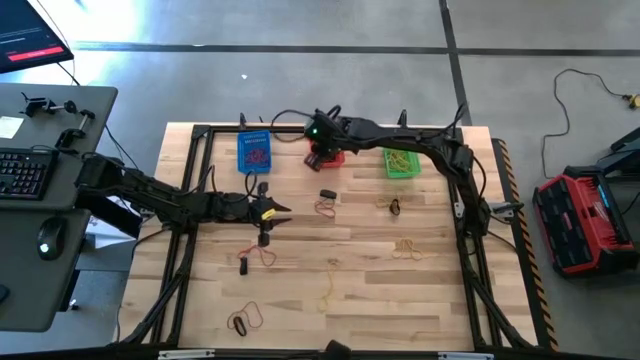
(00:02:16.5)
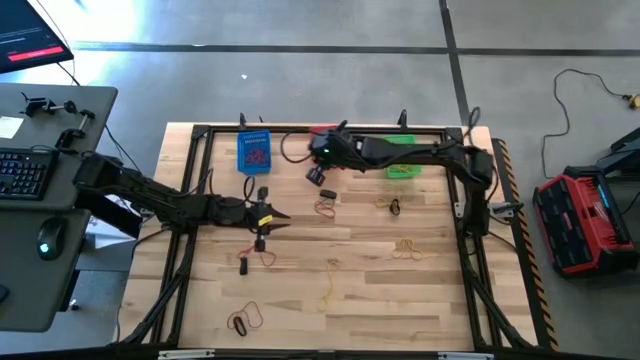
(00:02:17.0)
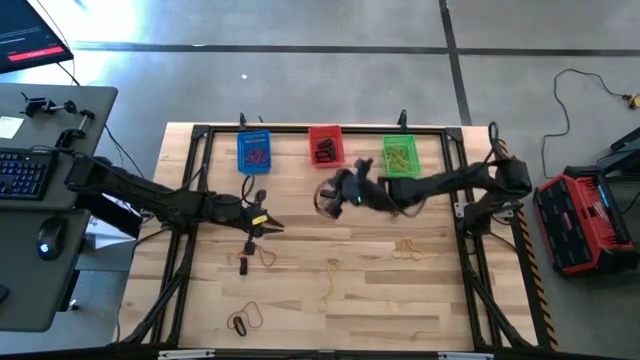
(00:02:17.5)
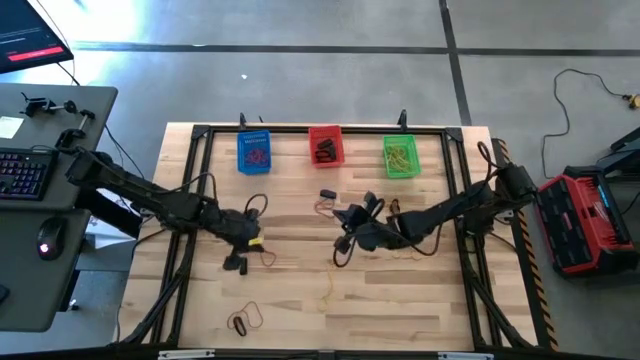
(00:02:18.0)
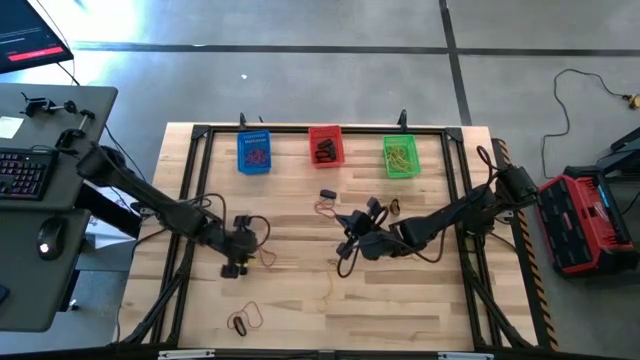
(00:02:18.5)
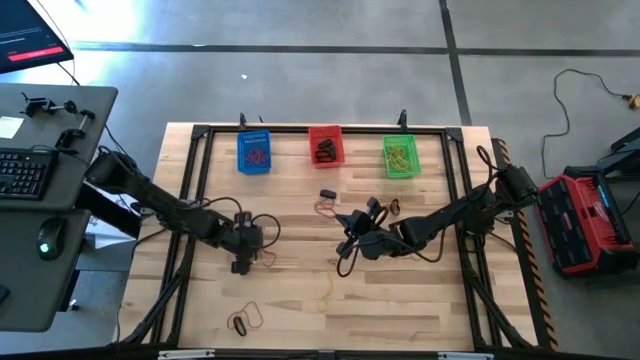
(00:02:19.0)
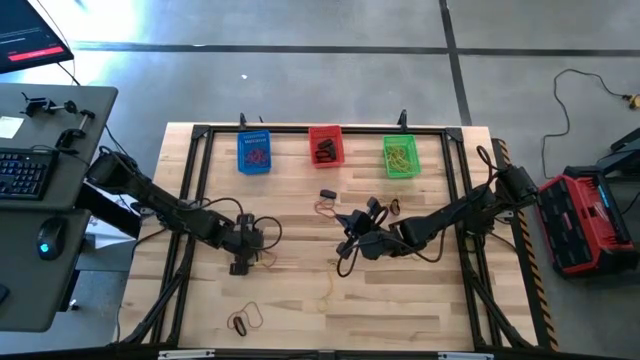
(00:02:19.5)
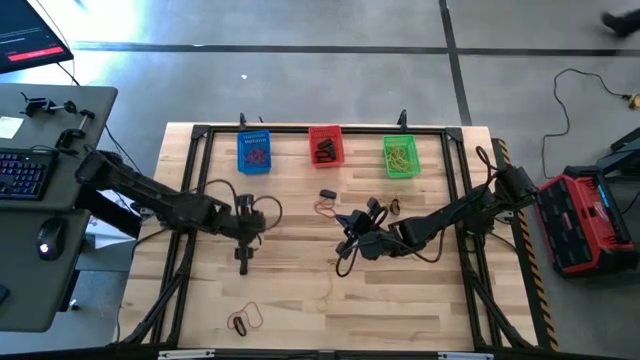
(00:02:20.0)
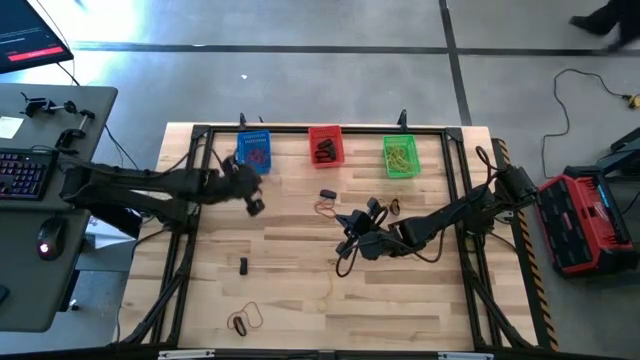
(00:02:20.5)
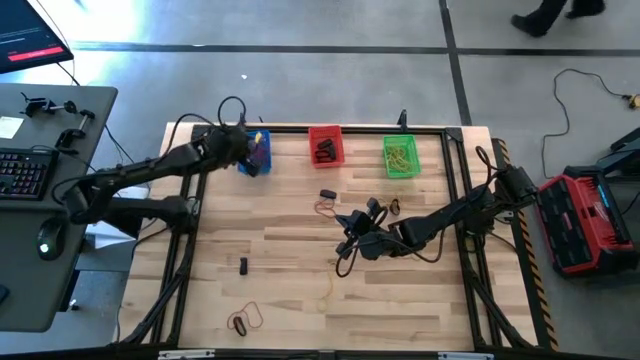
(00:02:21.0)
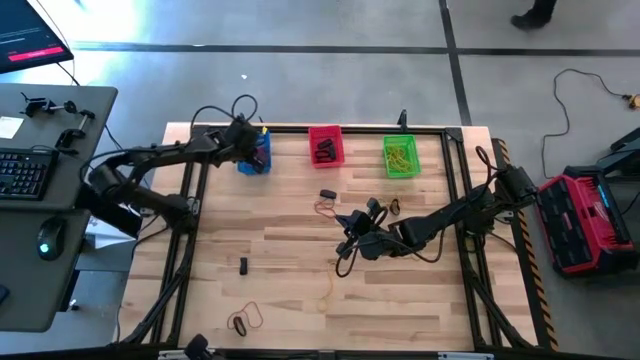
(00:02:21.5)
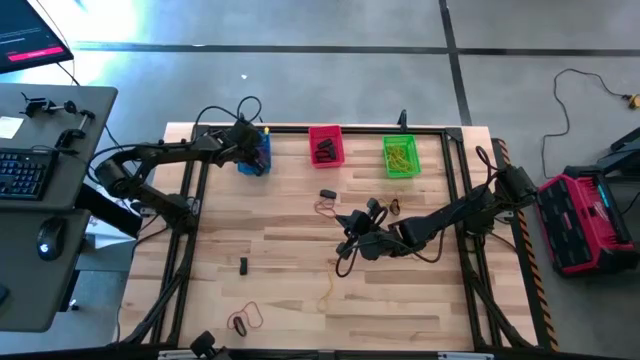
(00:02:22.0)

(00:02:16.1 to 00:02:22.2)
Task: Sort rubber bands into baskets
Put the red rubber band into the blue bin

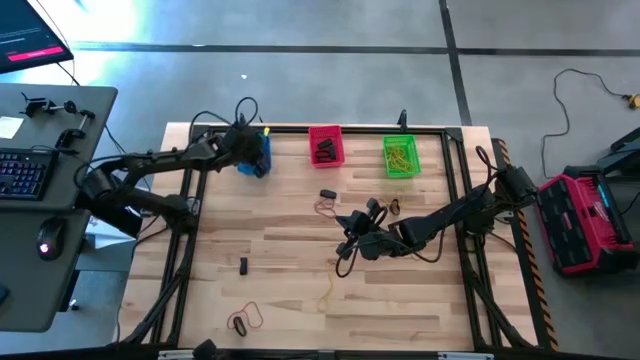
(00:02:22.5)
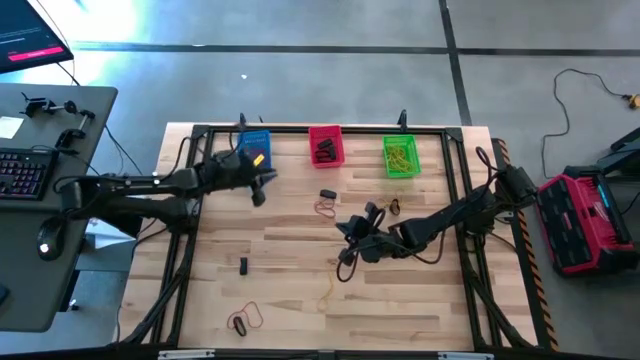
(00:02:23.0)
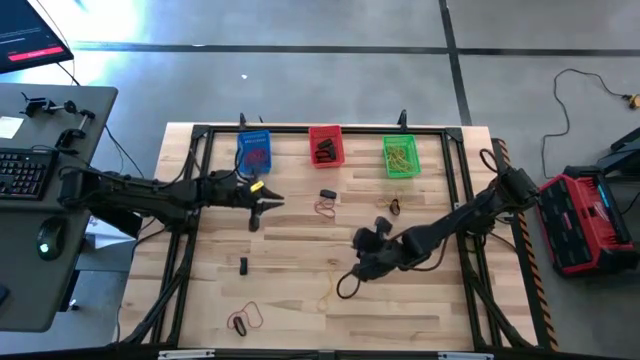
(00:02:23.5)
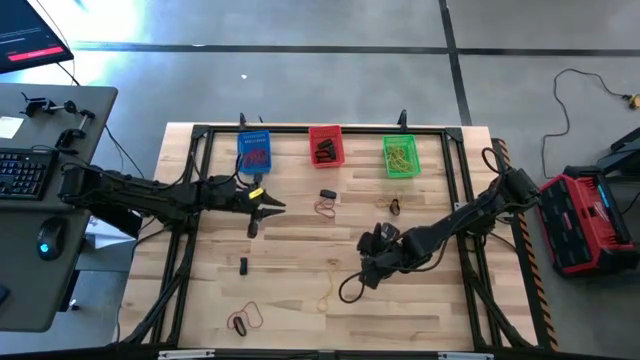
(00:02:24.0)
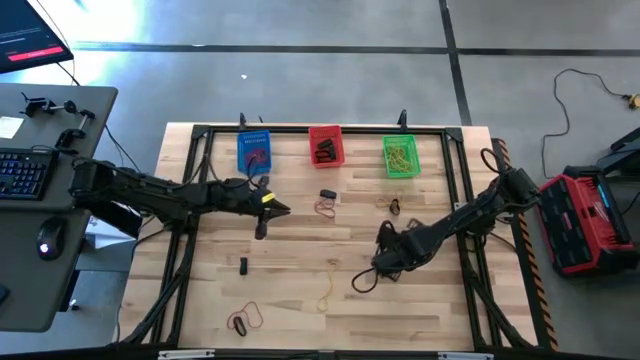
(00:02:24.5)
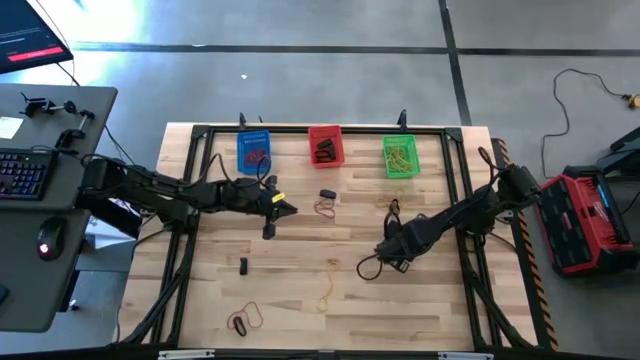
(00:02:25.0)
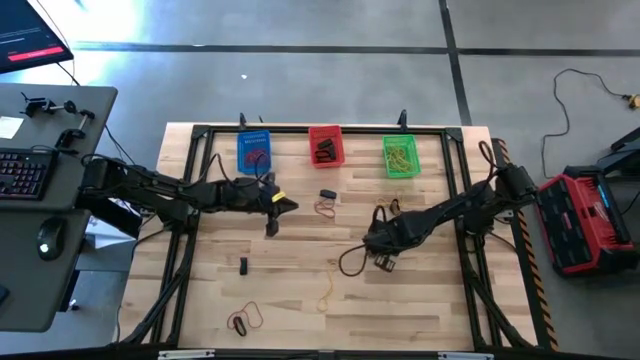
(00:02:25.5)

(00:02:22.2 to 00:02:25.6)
Put the yellow rubber band into the green bin

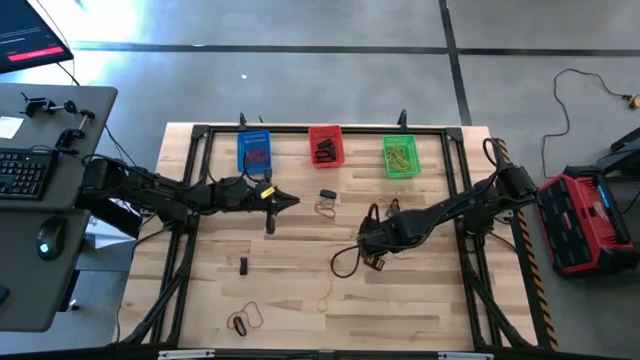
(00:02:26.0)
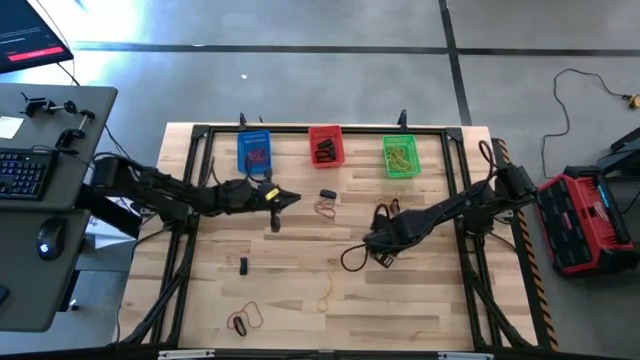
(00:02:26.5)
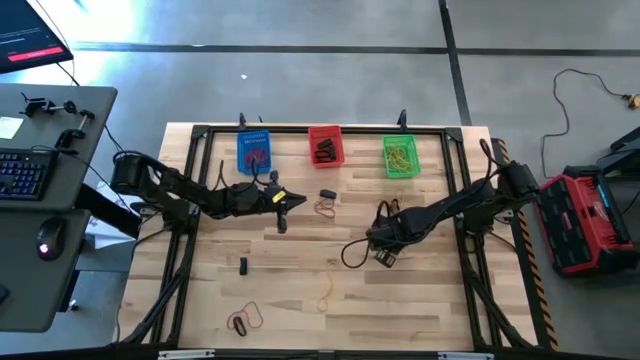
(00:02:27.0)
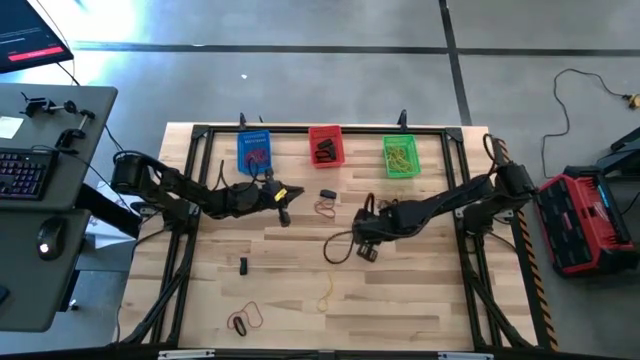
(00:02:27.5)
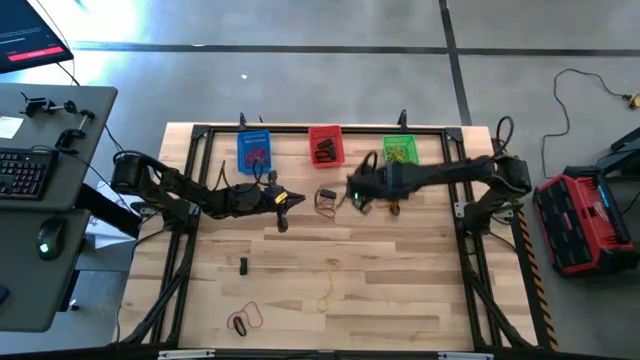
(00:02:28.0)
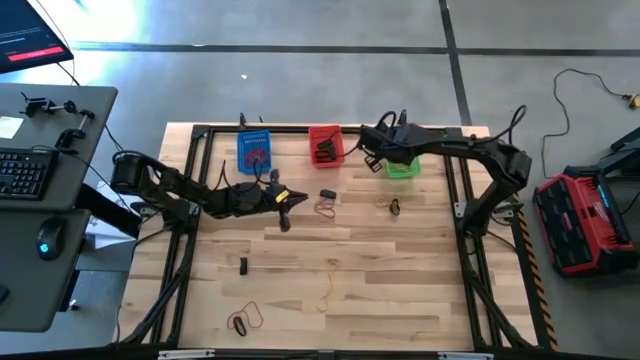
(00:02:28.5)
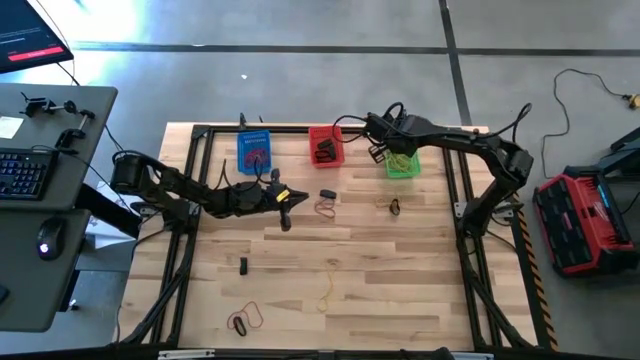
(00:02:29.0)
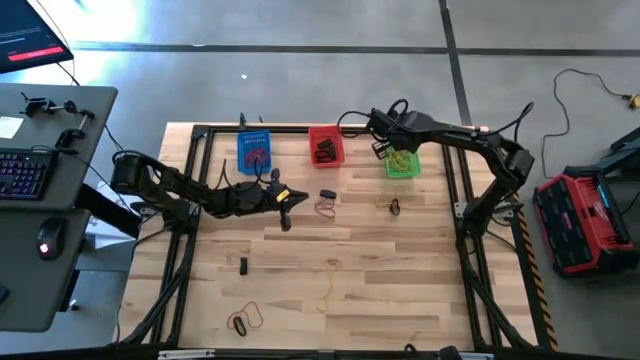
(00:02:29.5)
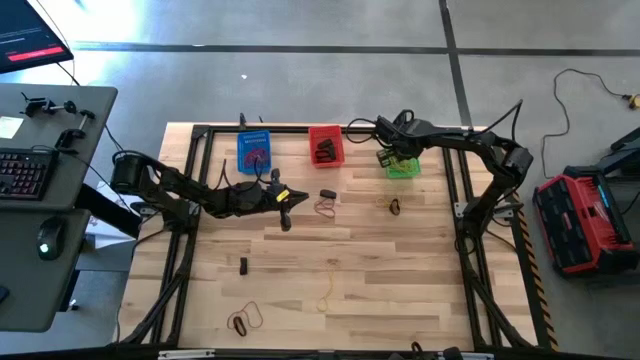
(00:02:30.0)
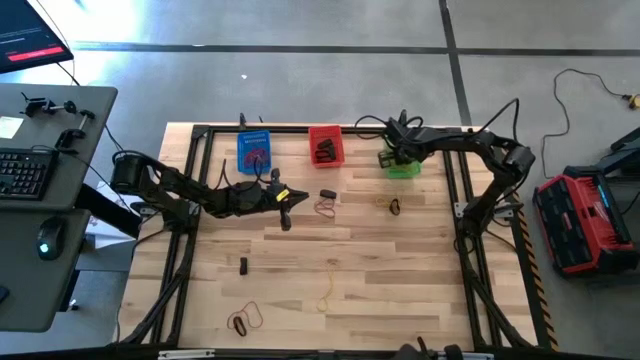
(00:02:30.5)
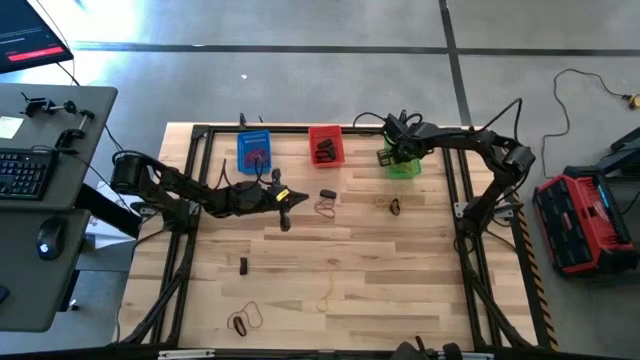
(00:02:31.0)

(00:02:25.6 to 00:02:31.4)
Put the yellow rubber band into the green bin

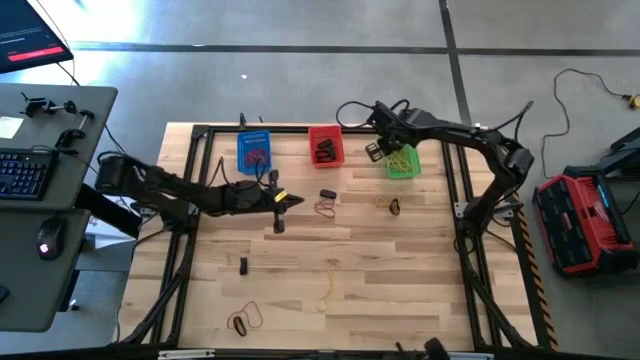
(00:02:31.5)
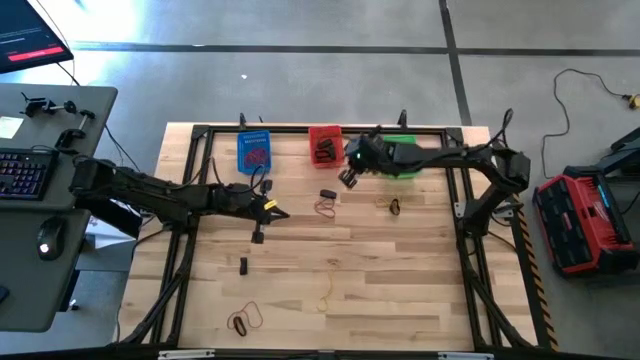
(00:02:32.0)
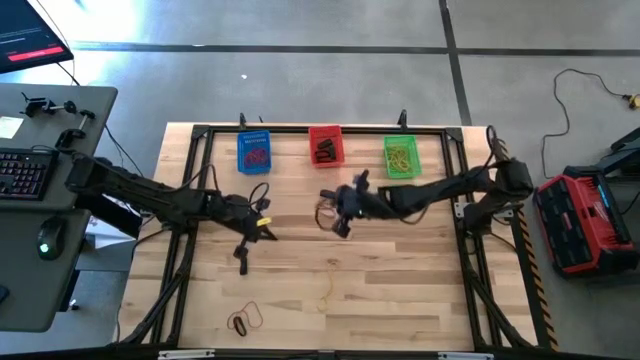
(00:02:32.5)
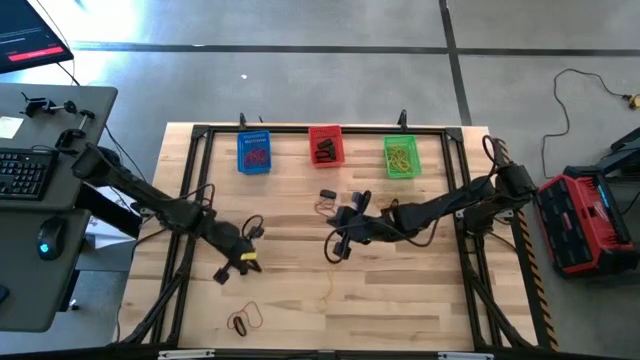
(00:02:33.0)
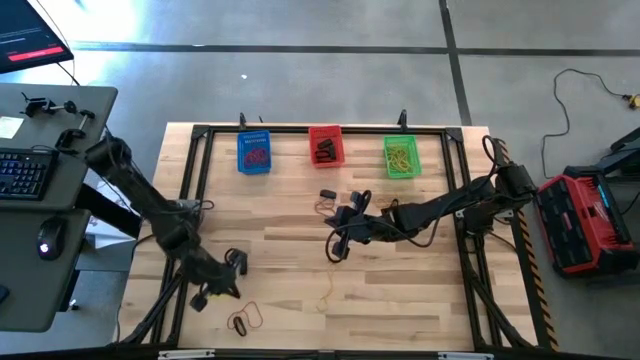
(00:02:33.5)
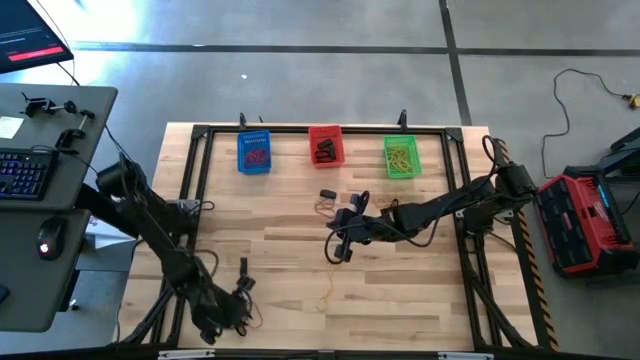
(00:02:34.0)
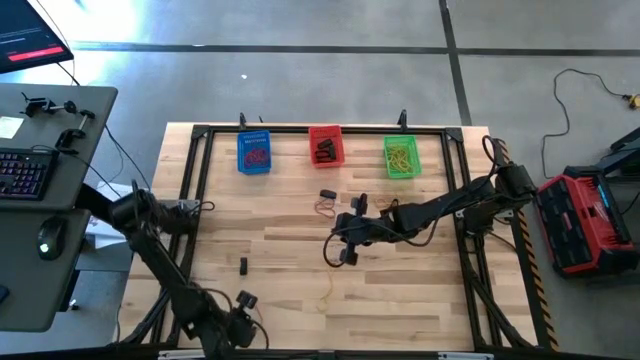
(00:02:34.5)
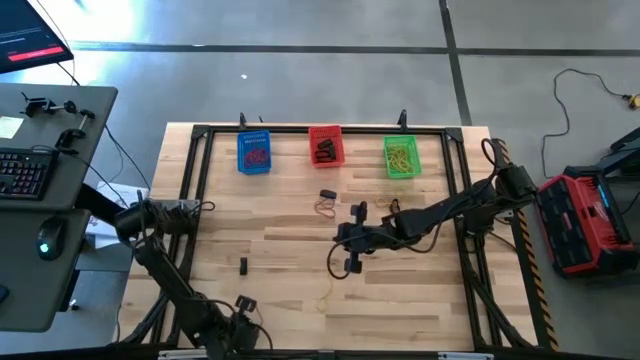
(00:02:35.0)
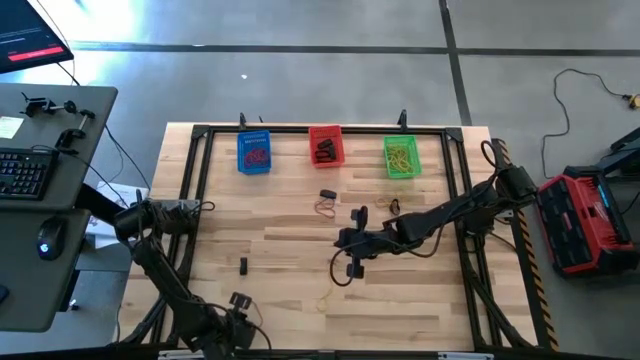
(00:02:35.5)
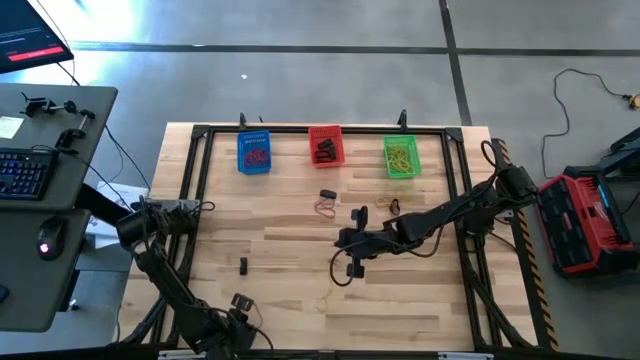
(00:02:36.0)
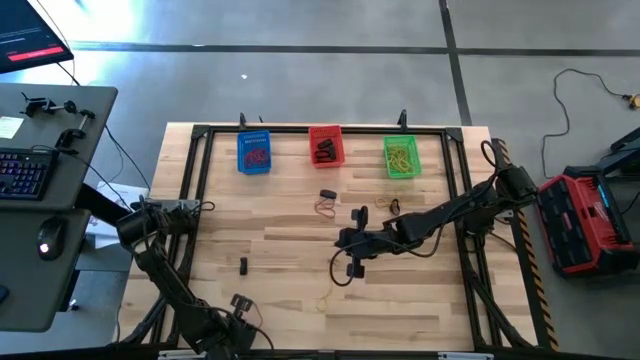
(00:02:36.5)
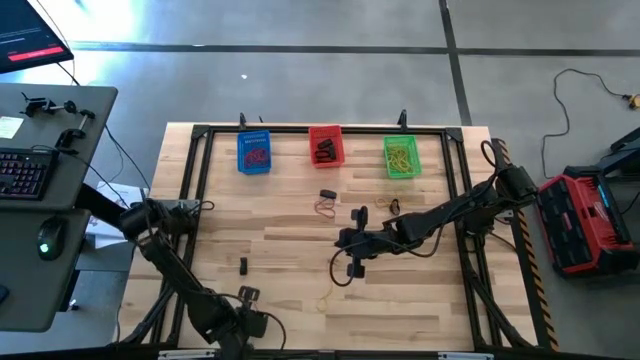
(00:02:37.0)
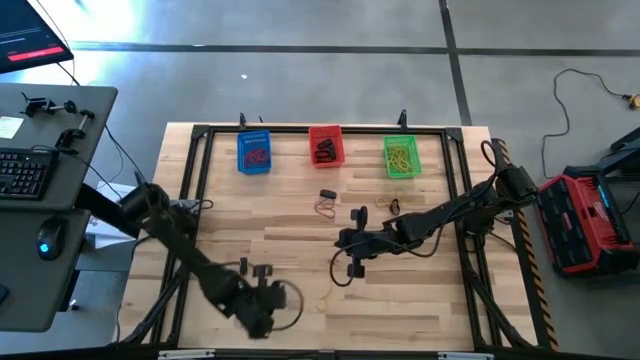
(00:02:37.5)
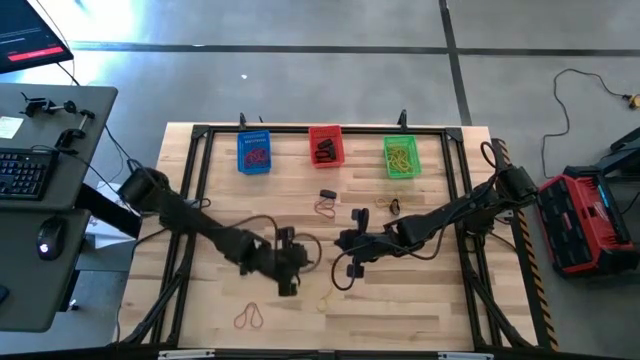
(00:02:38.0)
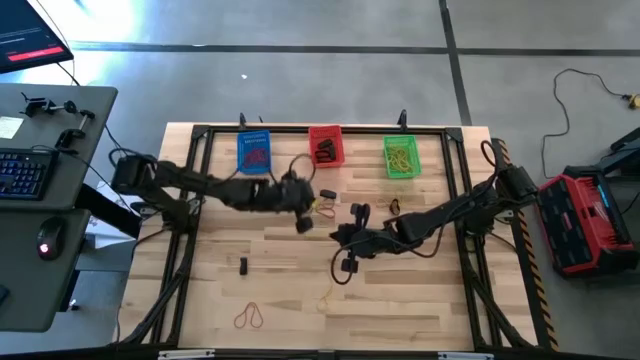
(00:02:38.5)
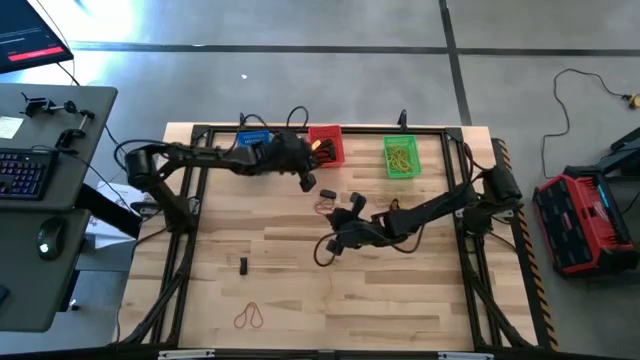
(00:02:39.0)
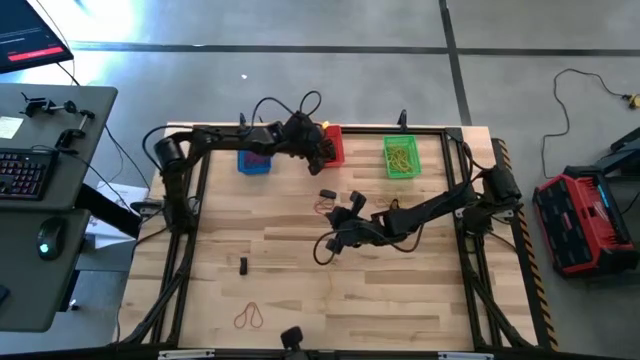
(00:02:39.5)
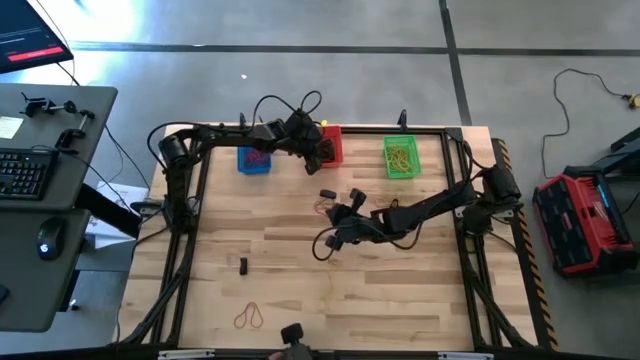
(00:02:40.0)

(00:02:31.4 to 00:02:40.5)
Put the black rubber band into the red bin
